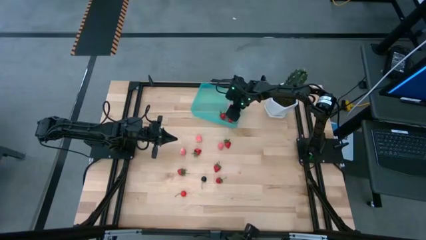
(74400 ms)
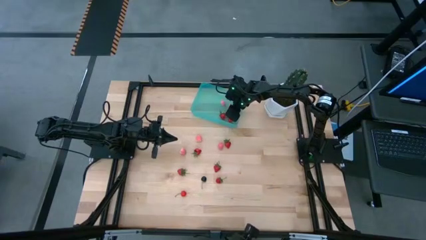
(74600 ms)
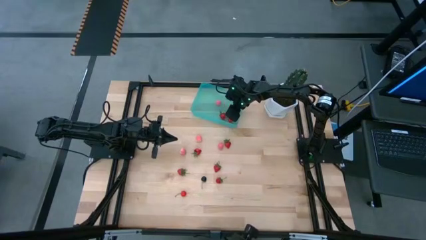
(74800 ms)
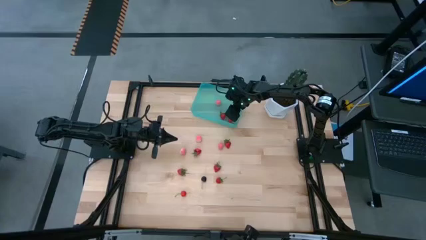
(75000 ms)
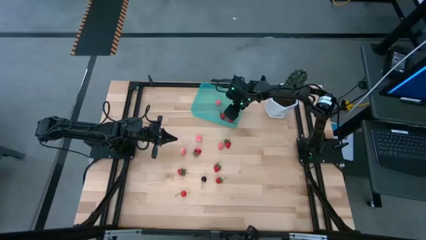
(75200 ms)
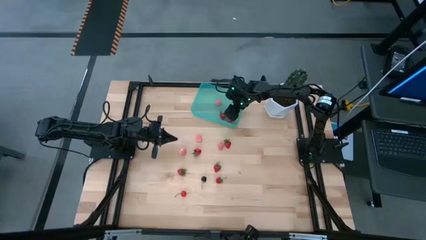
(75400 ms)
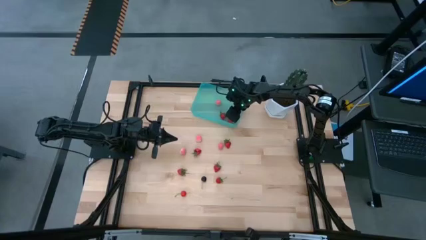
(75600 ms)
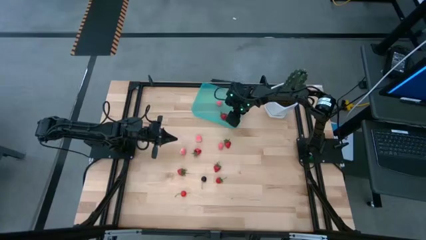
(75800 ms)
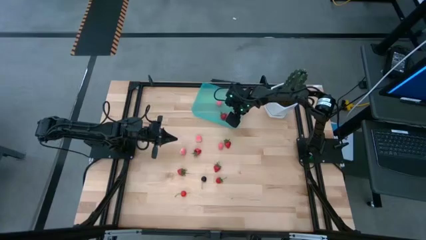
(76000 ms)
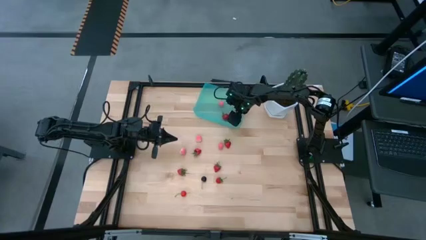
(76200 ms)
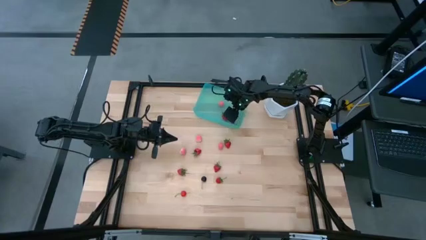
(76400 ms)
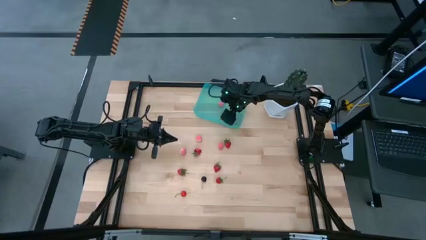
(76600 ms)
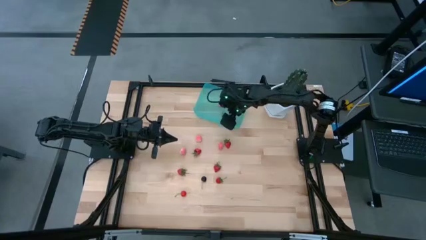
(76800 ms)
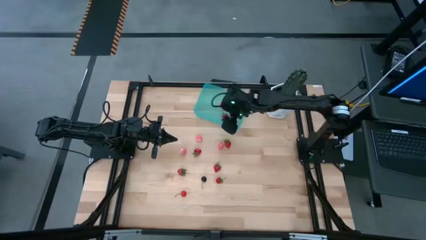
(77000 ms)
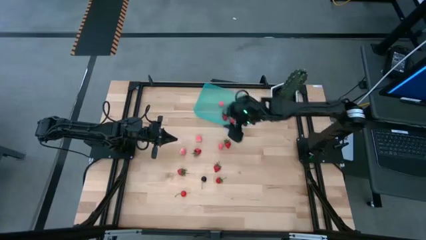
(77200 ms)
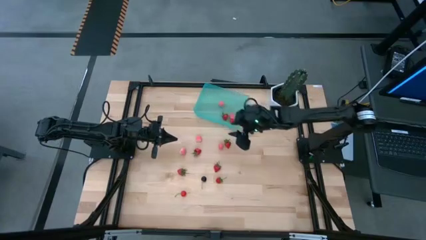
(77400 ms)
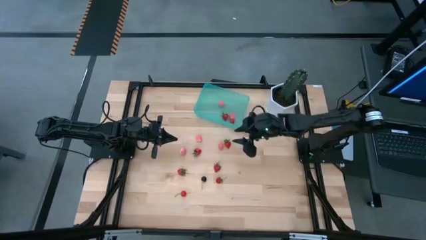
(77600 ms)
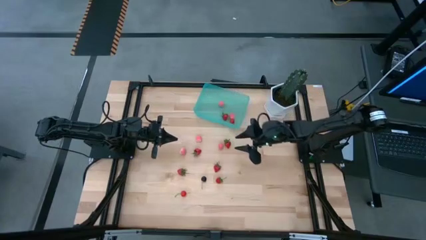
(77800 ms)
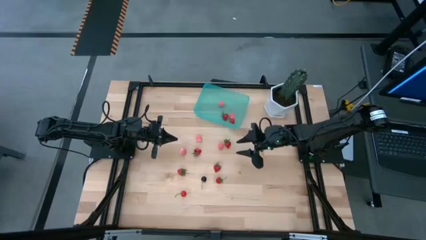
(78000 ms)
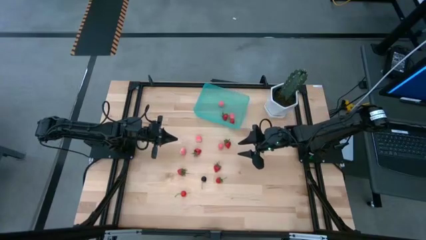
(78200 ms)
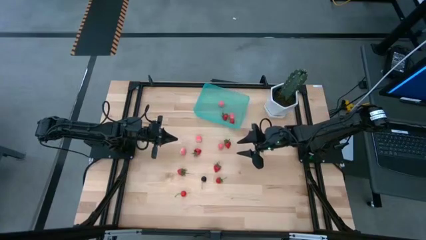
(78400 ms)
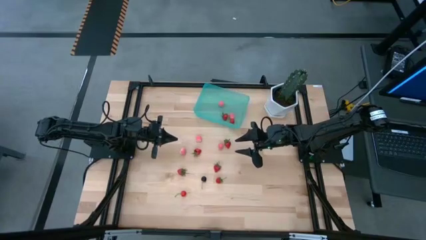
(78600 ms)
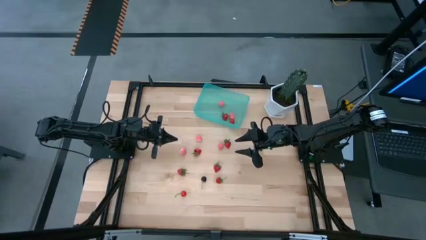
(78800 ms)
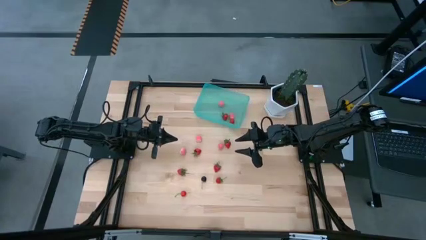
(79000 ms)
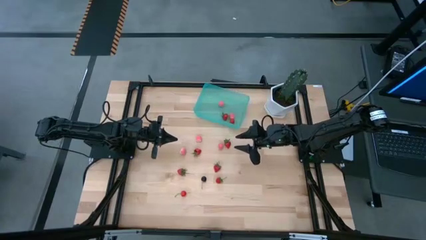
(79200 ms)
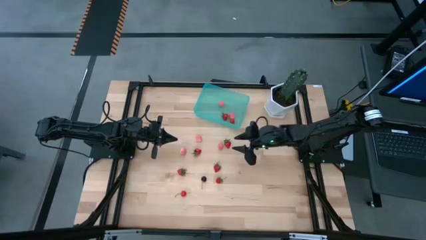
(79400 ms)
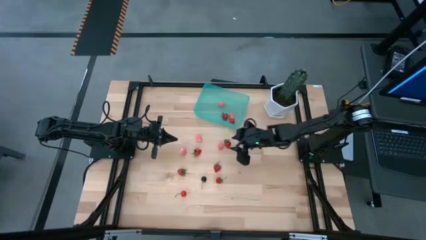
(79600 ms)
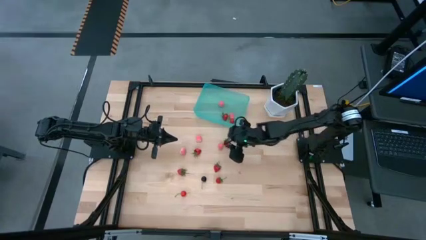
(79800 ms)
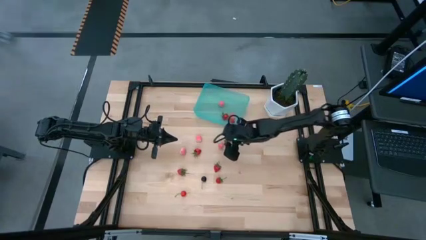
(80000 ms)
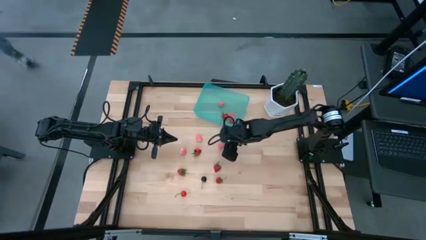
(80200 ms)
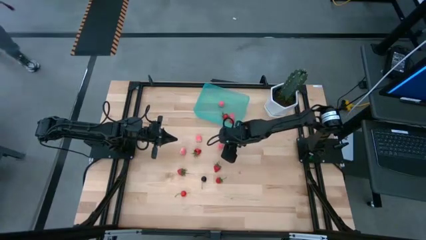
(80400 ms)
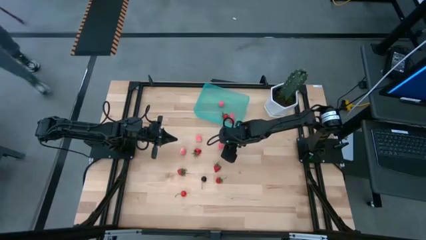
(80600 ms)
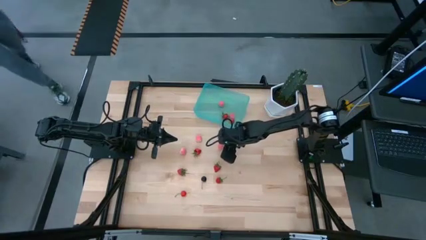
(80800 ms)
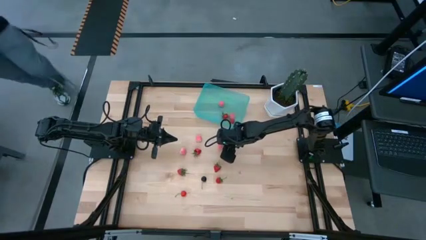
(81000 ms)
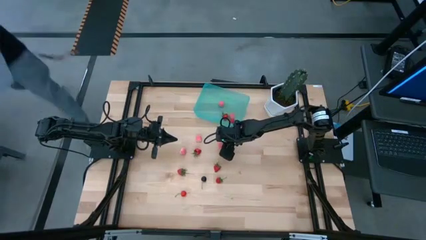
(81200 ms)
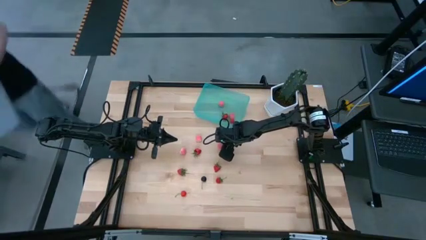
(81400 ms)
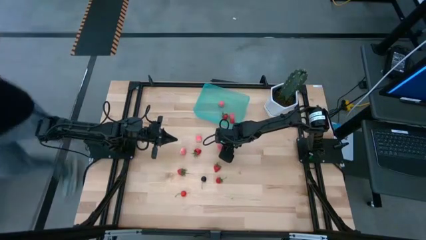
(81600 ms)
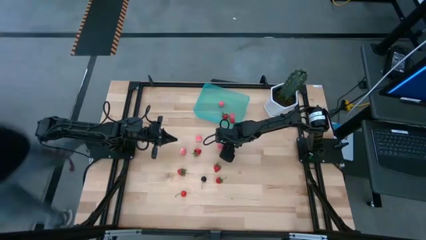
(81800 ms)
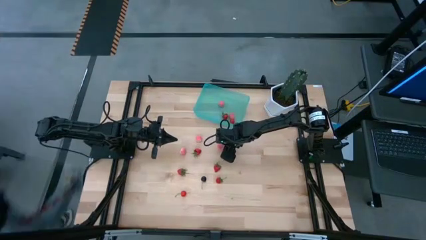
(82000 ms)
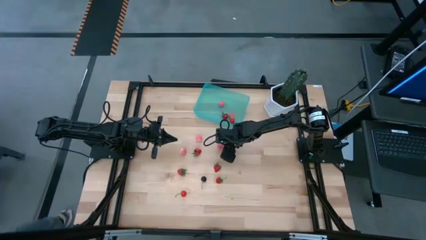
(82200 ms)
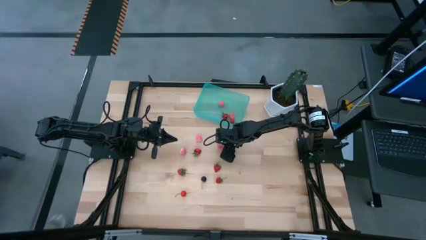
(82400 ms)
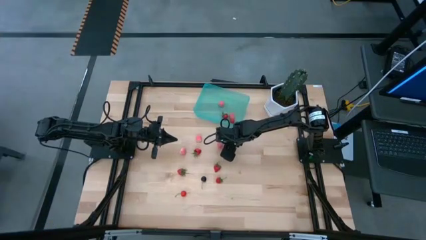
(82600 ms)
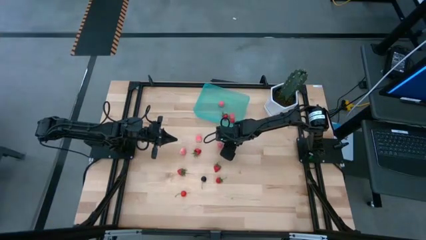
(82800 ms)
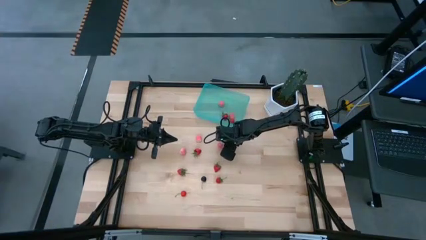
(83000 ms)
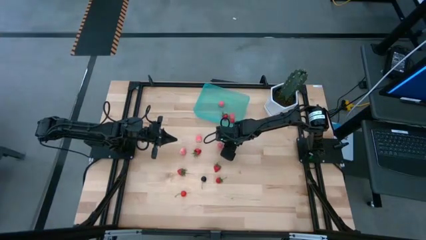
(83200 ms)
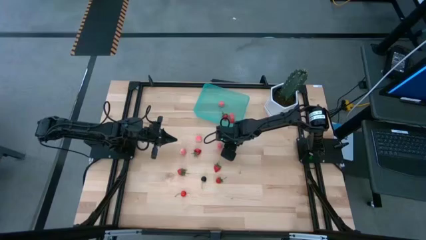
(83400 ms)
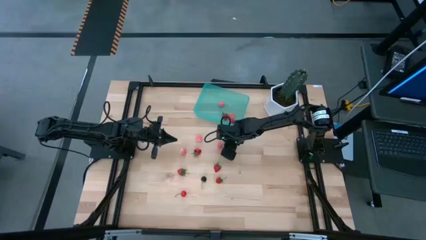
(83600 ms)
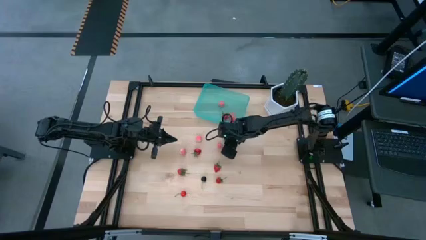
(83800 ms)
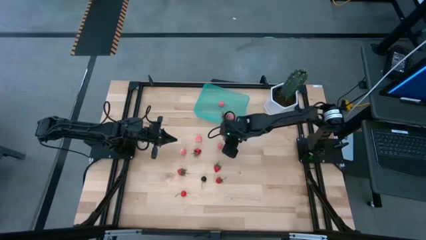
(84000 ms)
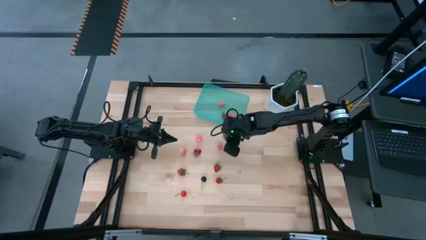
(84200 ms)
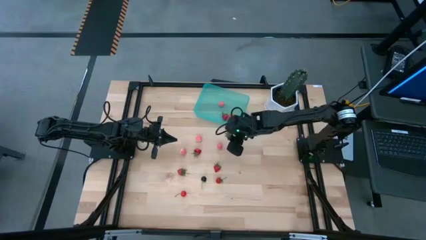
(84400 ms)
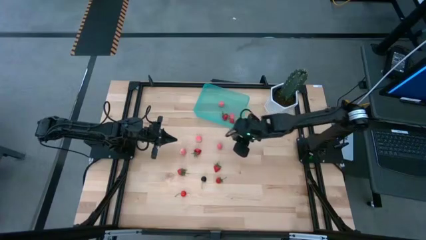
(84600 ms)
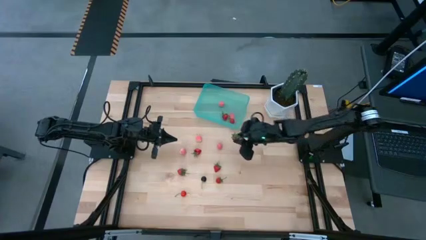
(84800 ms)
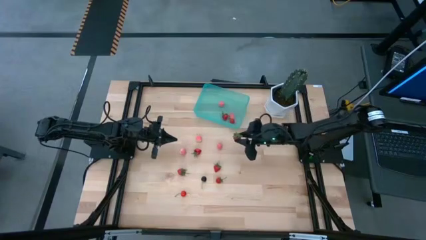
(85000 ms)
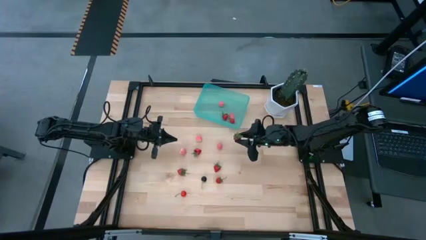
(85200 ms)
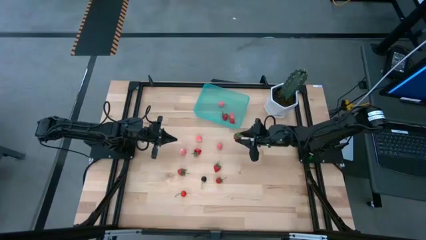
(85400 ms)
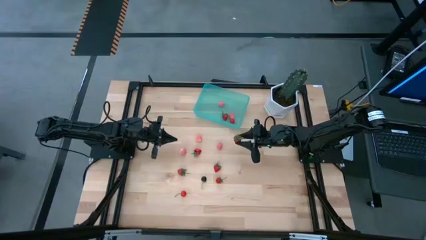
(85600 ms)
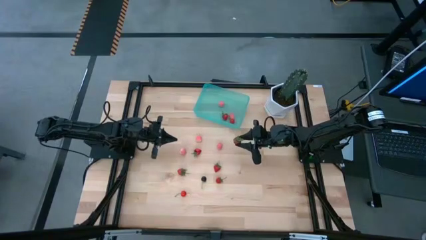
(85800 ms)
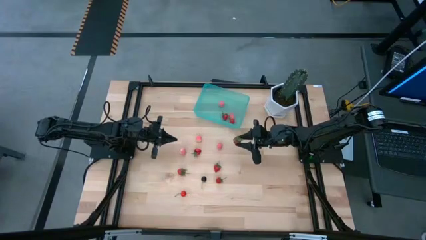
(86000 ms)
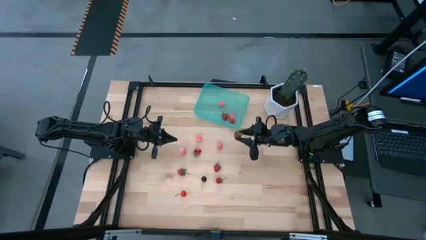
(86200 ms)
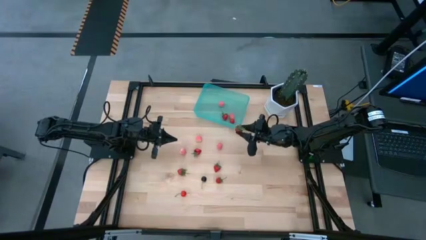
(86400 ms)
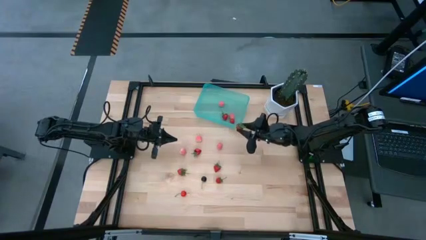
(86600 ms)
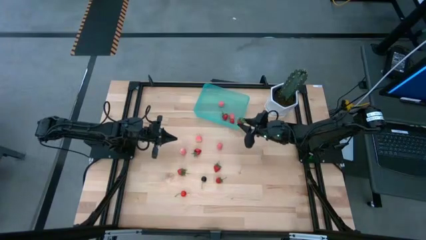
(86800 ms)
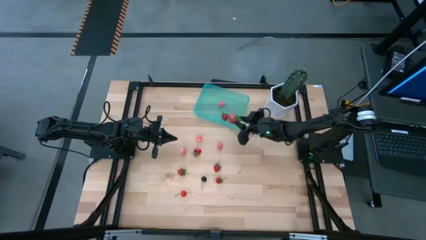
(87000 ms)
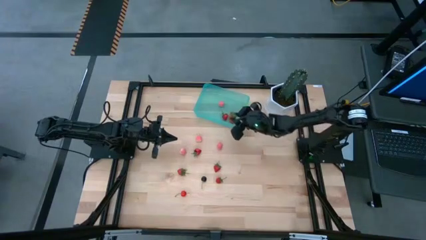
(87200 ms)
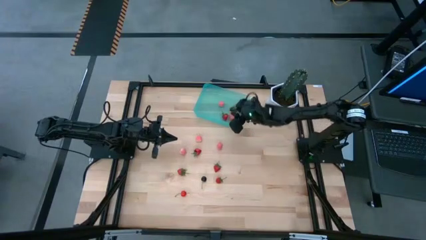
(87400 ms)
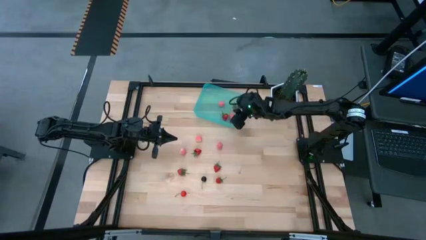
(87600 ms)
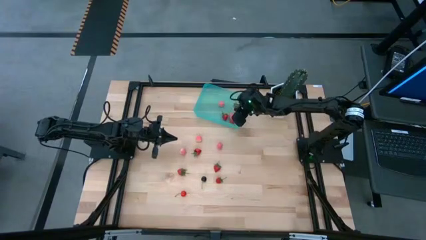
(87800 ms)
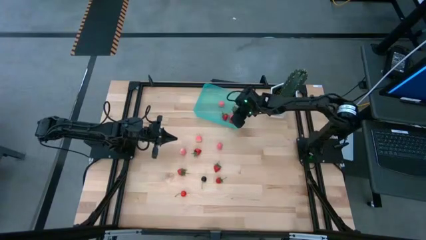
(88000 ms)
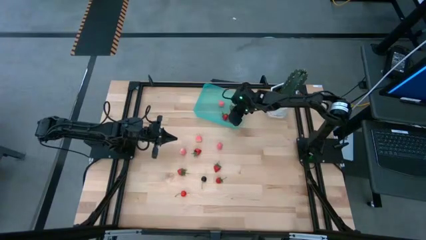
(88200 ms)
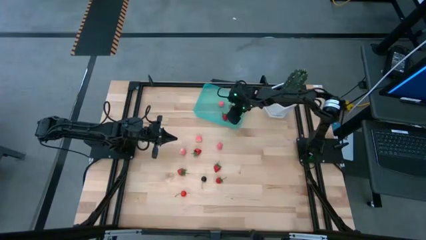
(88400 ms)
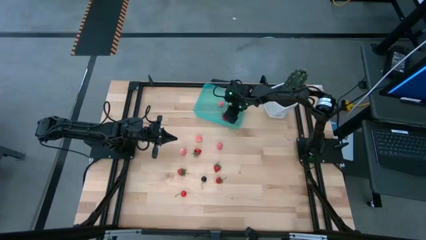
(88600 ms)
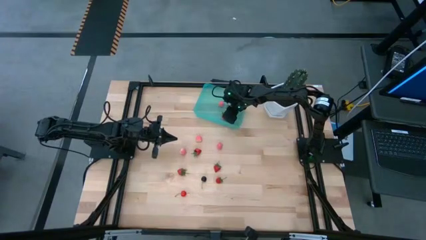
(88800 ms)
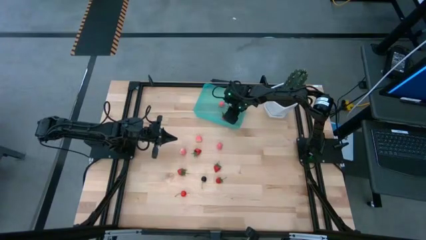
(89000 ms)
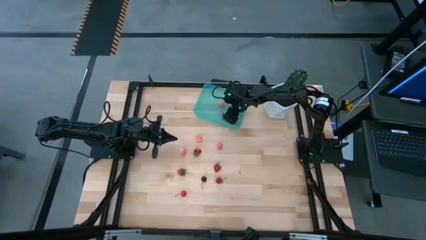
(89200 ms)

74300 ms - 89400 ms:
Task: Pick and placing Produce into tupperware
Put the red strawberry into the light blue bin
